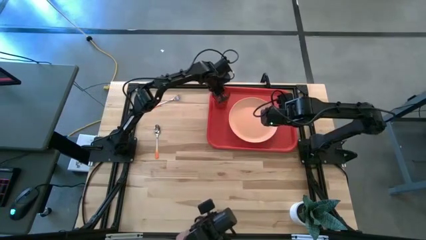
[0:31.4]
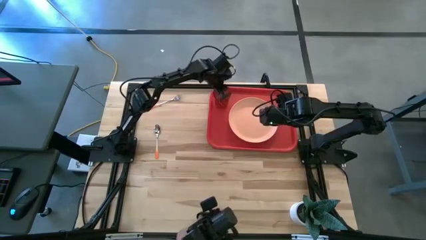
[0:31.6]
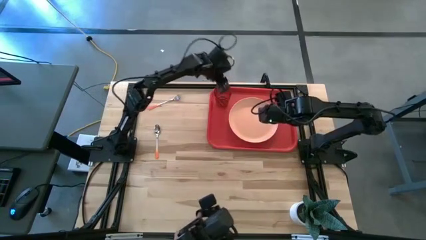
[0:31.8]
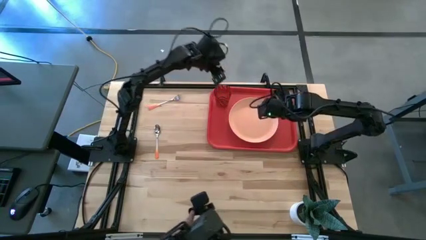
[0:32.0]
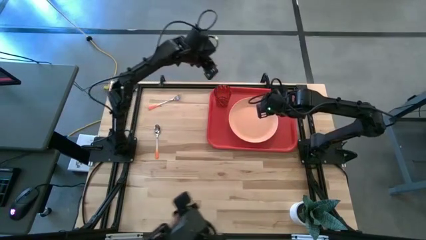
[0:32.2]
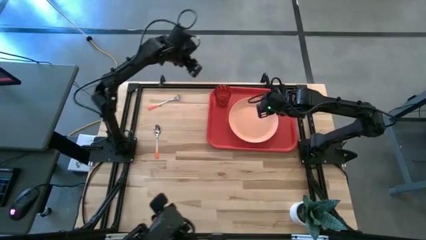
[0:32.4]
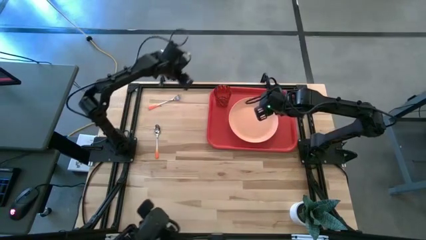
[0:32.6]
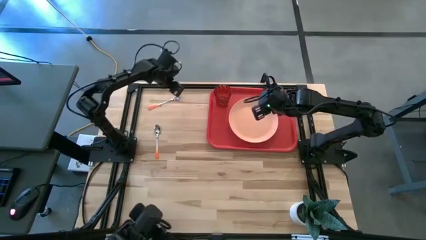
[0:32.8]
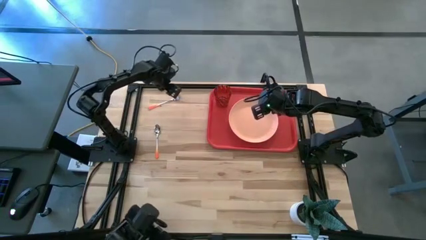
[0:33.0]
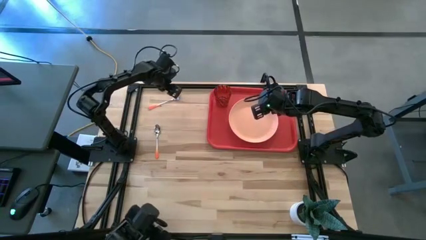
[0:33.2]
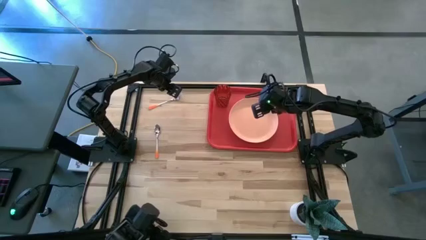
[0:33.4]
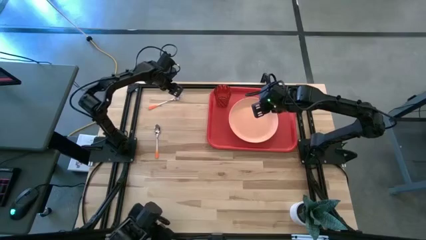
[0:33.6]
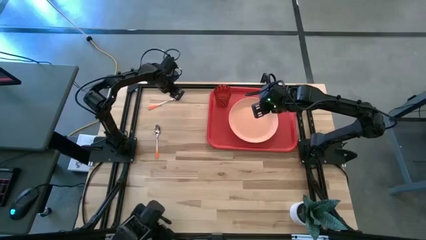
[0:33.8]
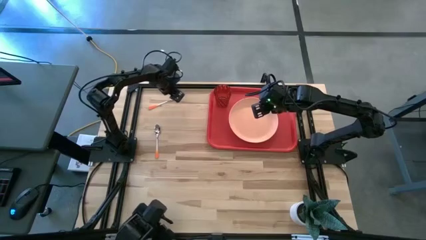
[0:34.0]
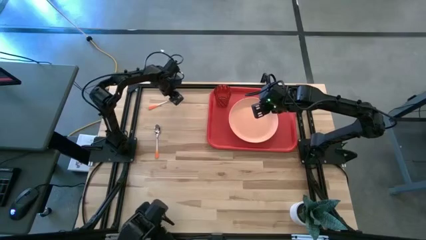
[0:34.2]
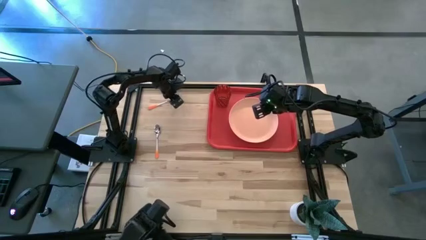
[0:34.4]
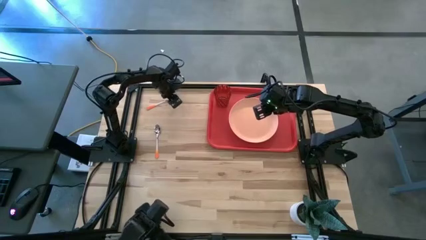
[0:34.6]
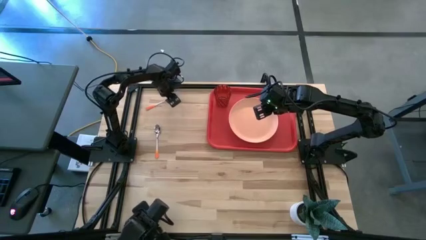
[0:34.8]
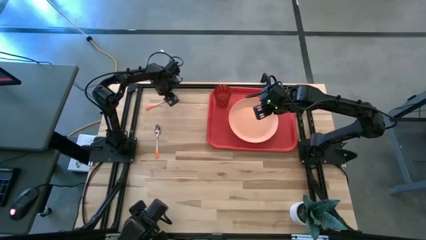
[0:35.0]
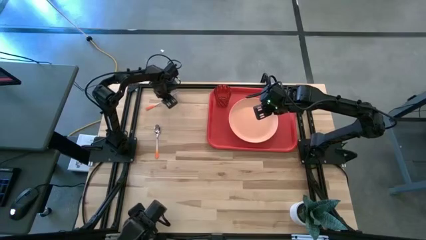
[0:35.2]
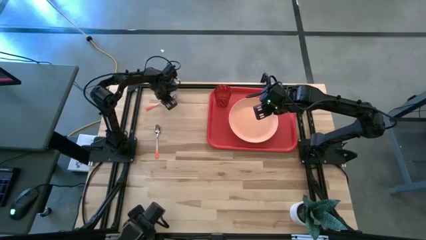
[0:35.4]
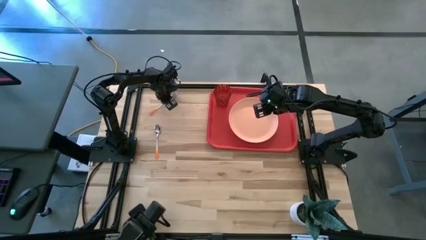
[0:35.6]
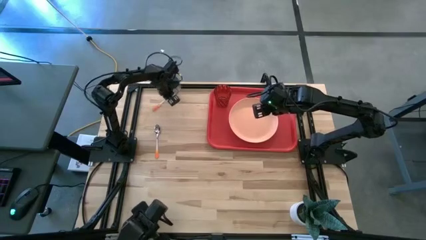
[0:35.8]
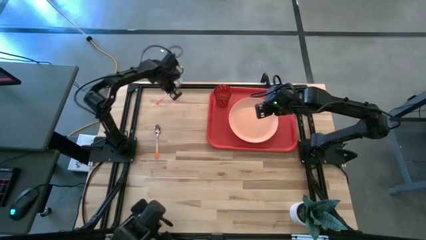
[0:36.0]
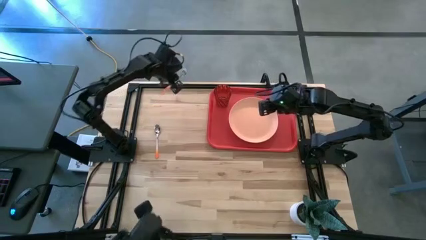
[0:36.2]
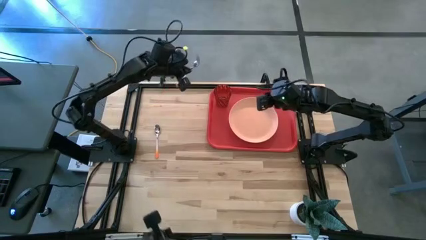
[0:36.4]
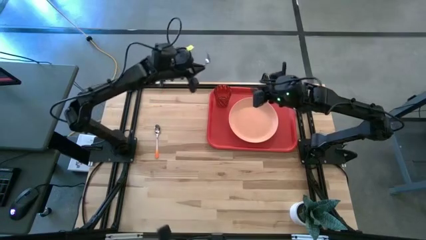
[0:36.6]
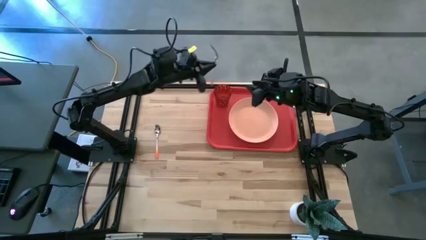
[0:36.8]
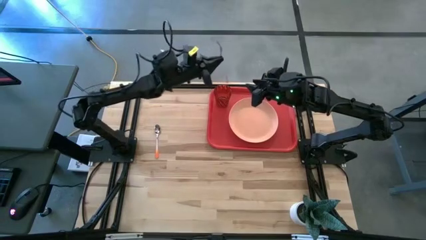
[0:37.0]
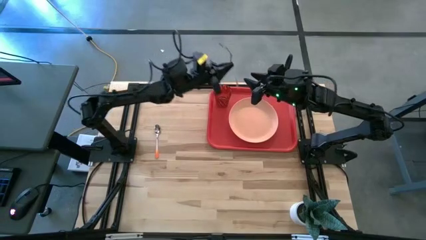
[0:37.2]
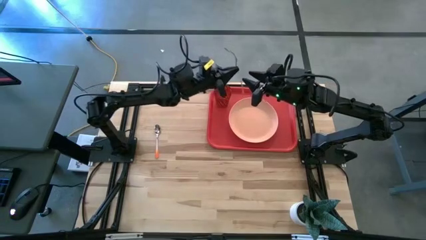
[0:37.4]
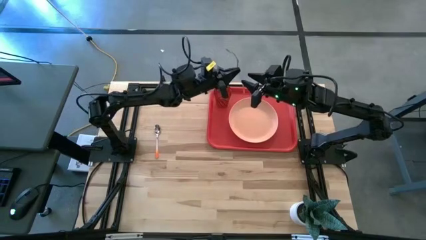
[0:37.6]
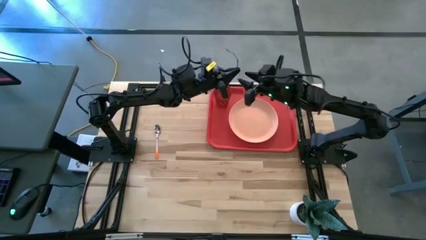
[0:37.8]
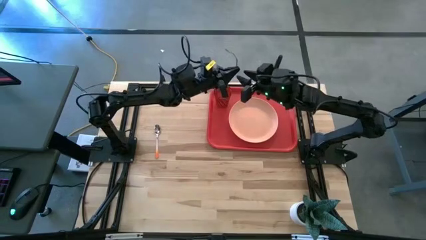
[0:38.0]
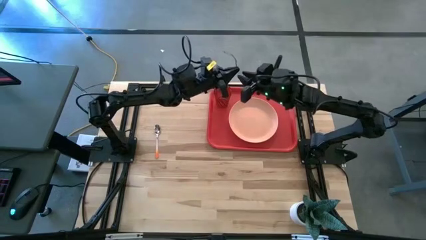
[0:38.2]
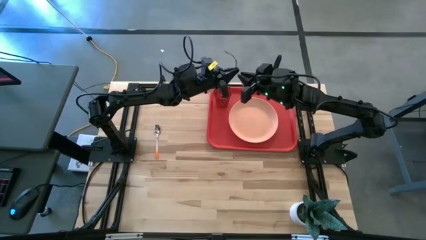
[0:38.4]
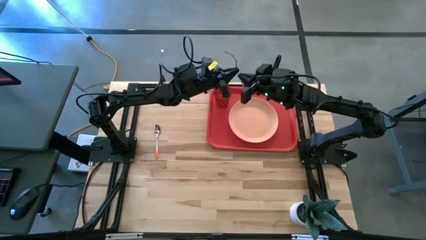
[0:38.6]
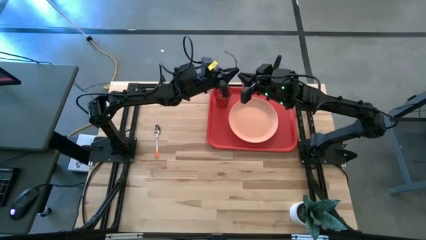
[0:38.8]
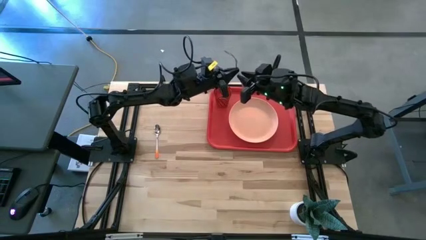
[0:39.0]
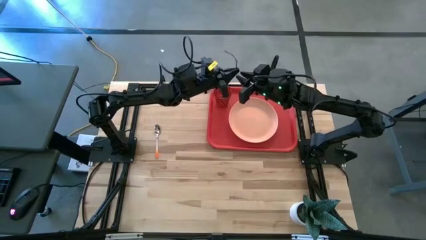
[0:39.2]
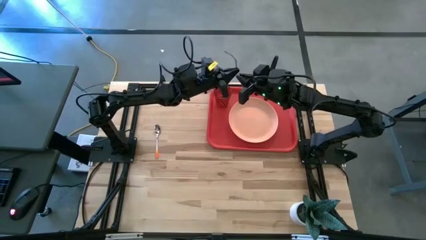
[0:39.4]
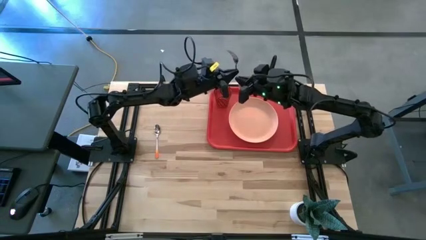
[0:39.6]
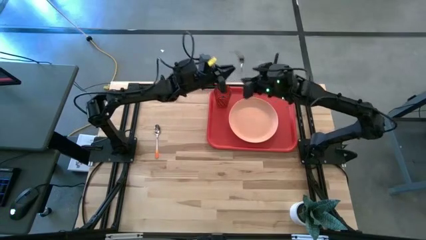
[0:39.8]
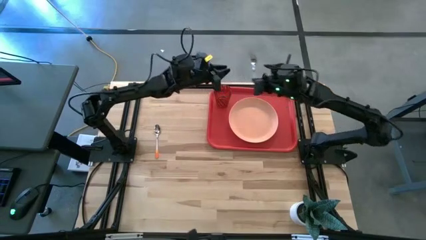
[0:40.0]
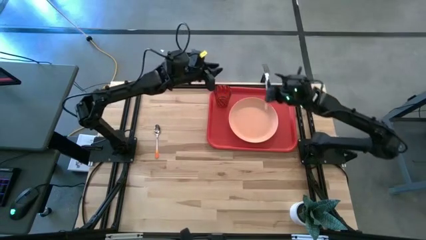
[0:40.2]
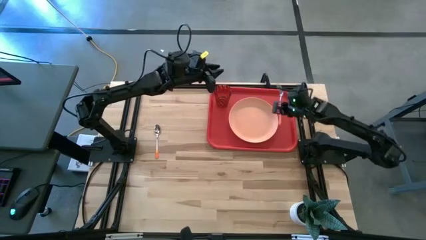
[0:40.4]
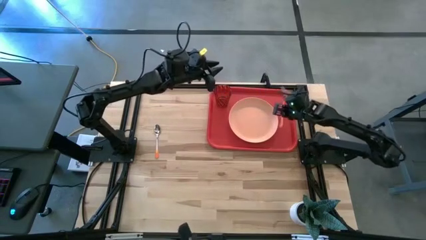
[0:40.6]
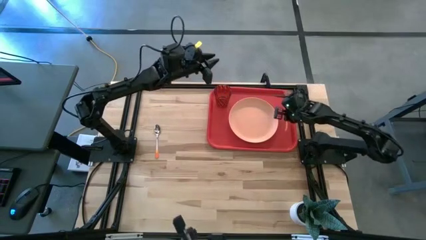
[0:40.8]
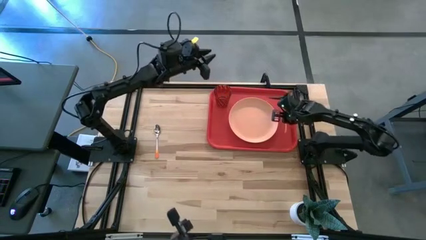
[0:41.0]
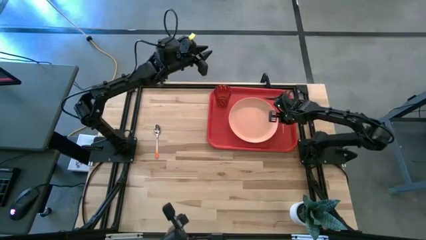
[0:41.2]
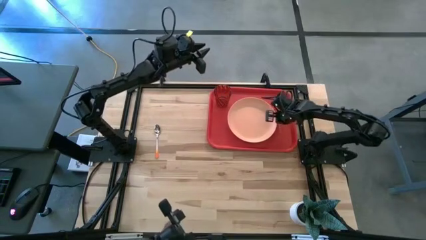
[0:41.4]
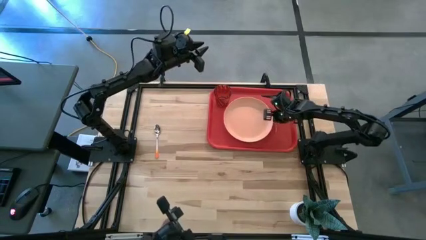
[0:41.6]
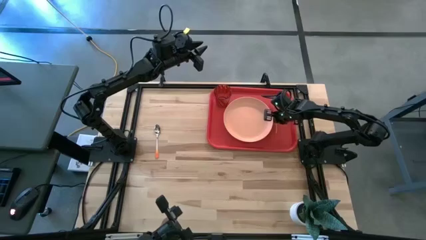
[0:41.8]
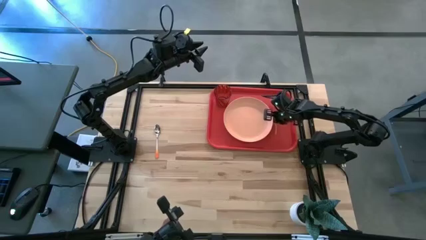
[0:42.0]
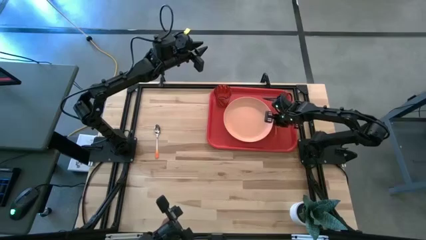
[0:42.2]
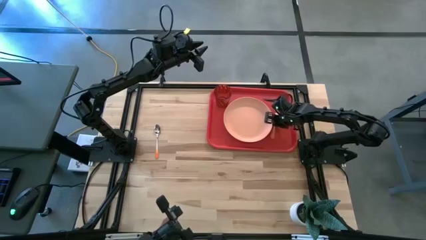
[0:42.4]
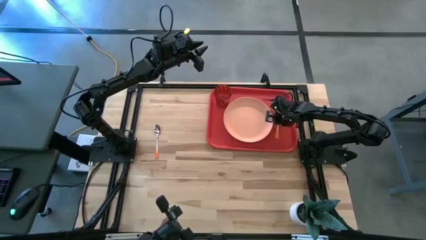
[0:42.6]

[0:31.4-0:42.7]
Task: Pick and place plate/cup/fork/spoon on tray
Put the fork on the red tray to the right of the pink plate
